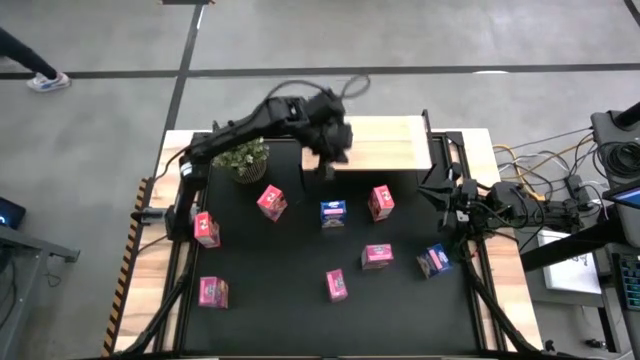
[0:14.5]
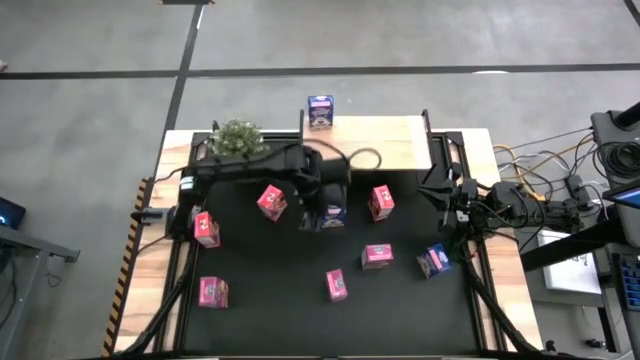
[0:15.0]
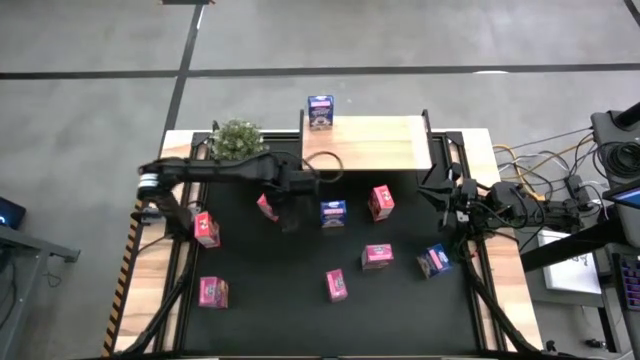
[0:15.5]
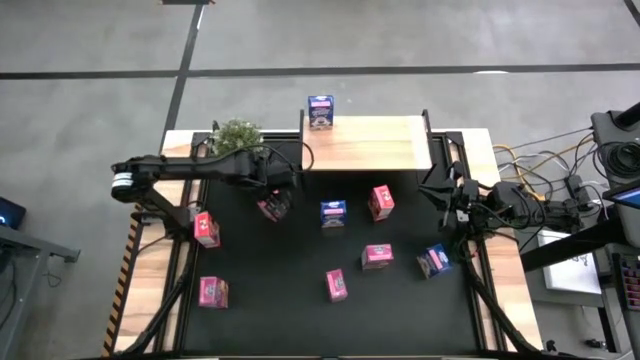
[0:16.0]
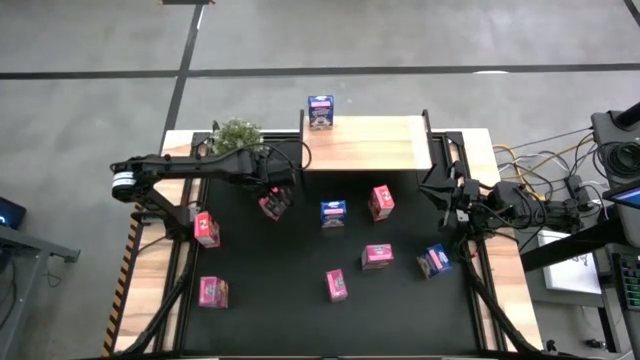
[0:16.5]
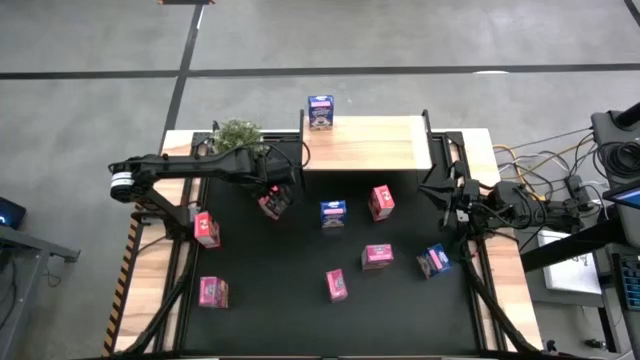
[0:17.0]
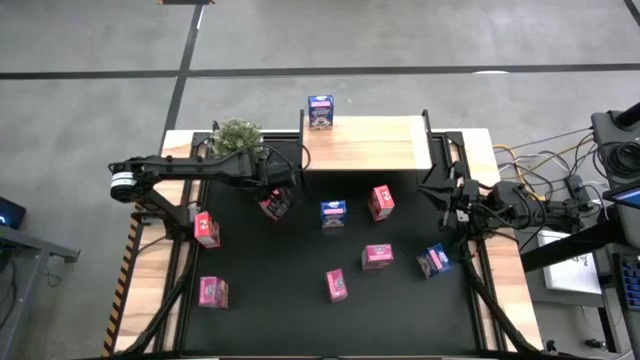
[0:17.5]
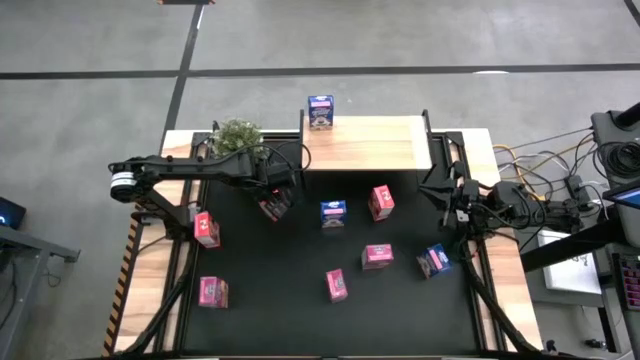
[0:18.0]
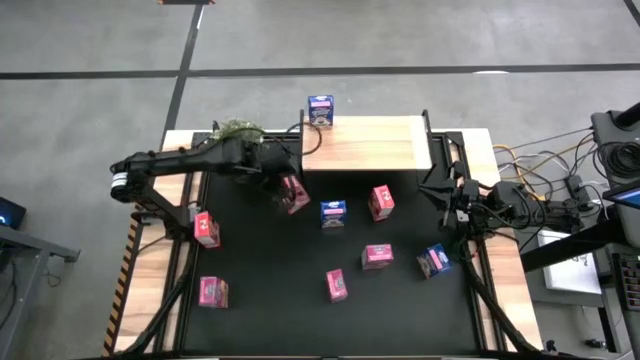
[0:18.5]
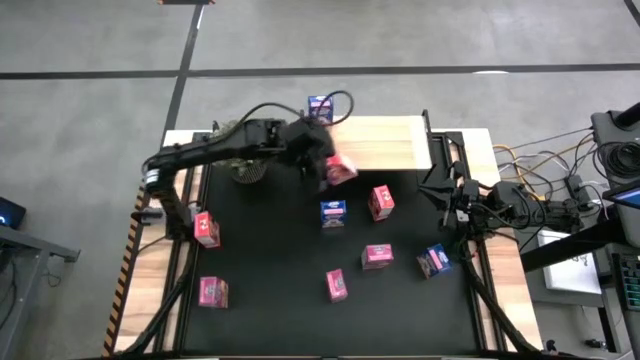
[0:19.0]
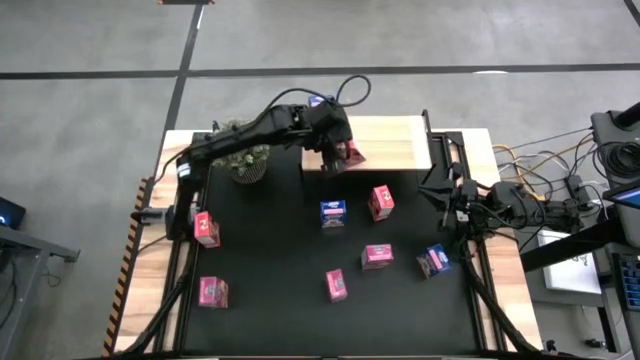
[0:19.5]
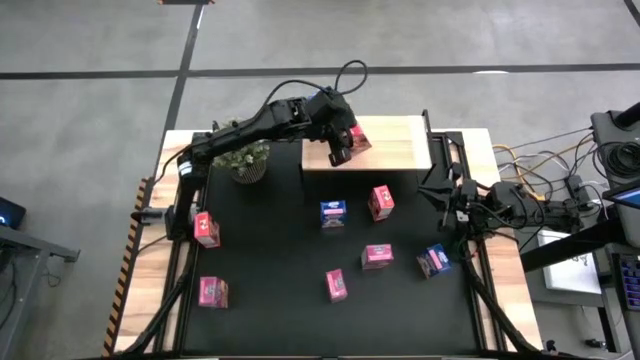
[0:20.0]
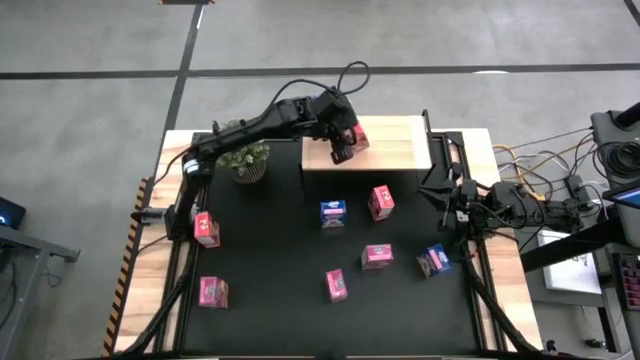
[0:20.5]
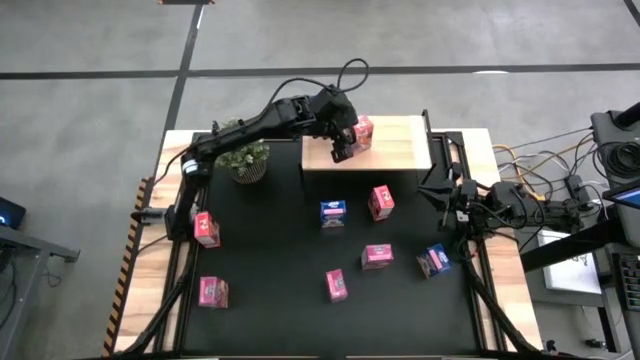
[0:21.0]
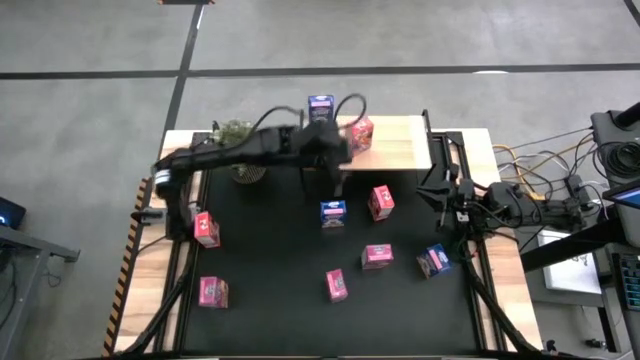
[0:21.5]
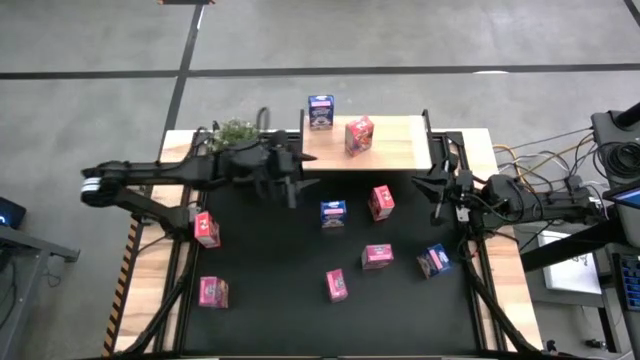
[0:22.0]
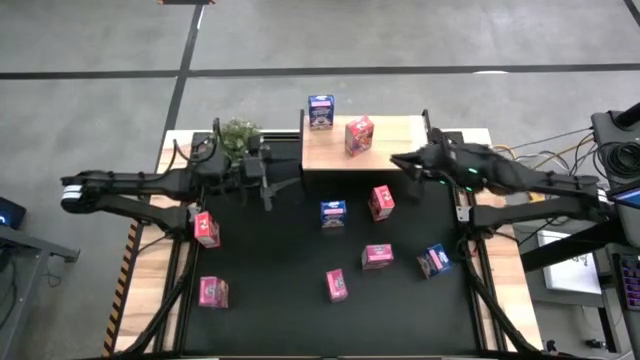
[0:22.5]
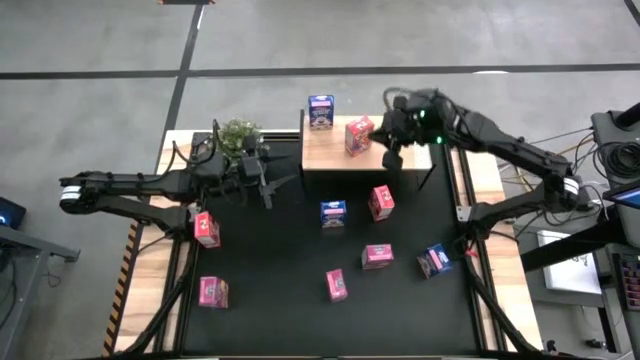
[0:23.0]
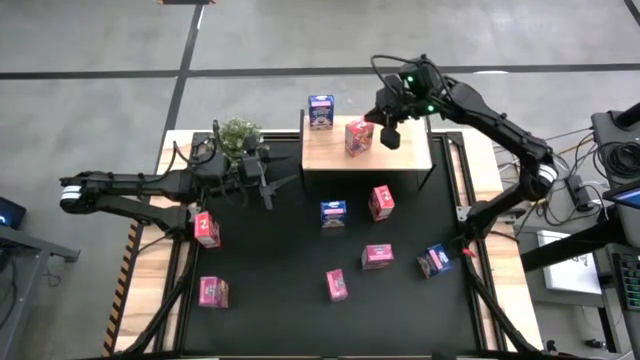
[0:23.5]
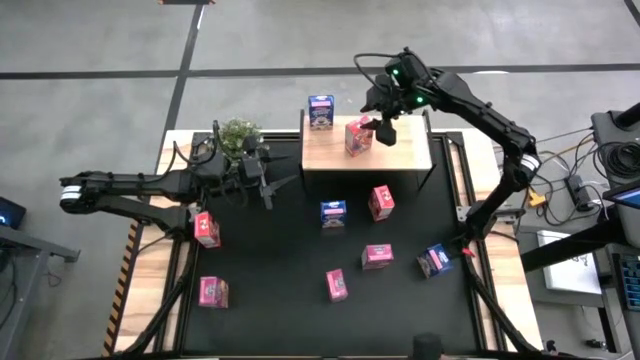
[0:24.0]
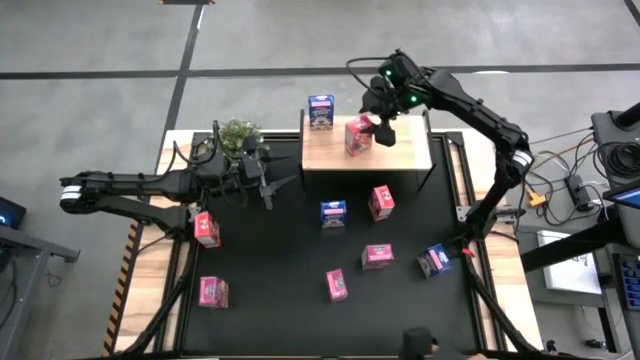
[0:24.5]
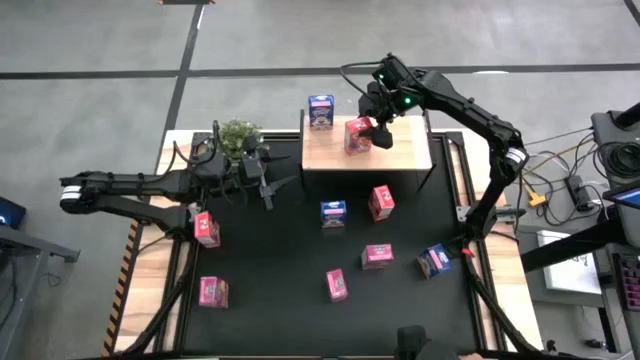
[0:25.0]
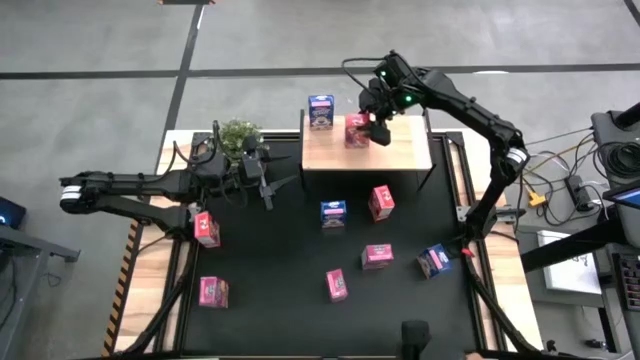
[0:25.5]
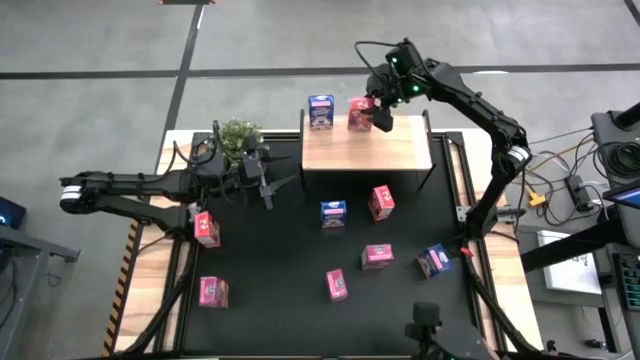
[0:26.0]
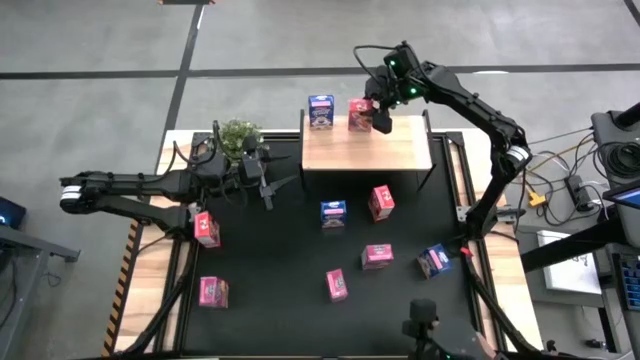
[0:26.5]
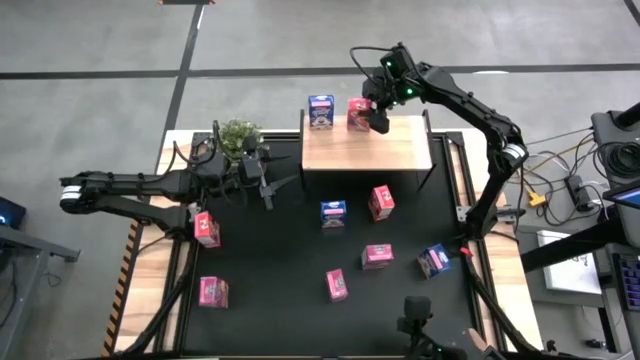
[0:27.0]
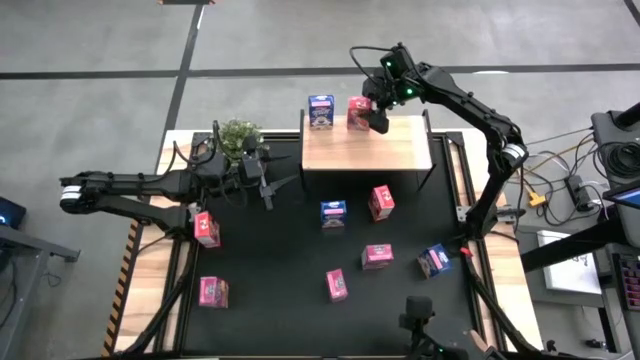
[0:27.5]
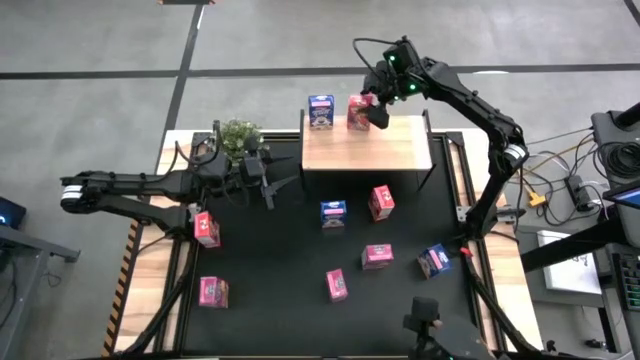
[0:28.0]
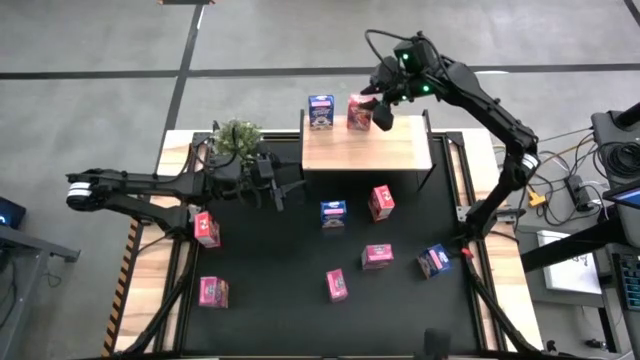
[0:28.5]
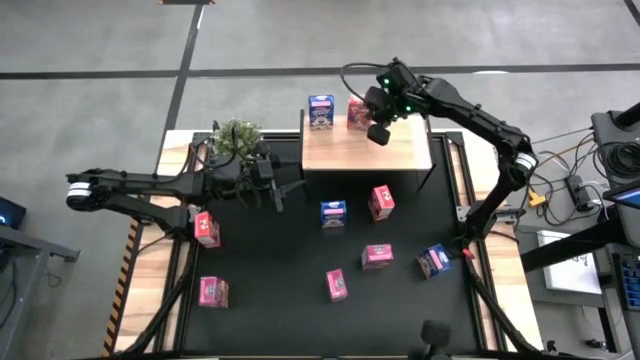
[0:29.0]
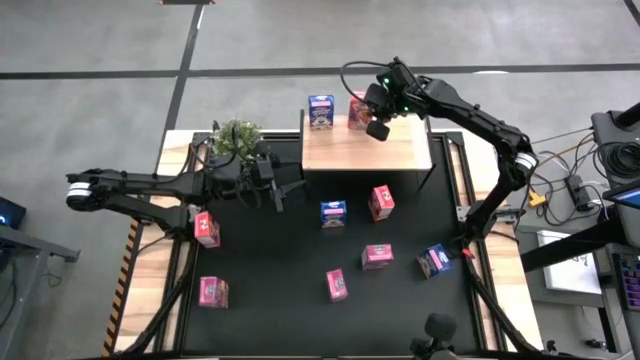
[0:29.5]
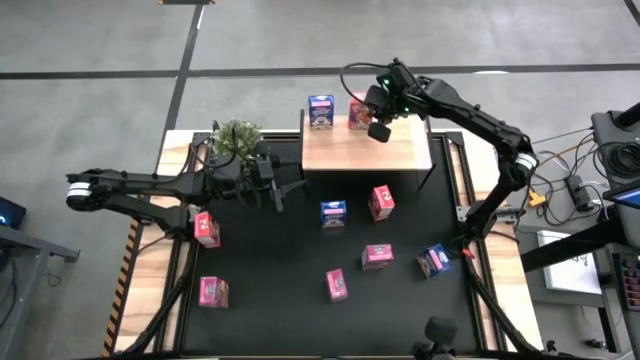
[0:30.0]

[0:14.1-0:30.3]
Task: Stack cereal on shelf
Put the middle red cereal box on the shelf

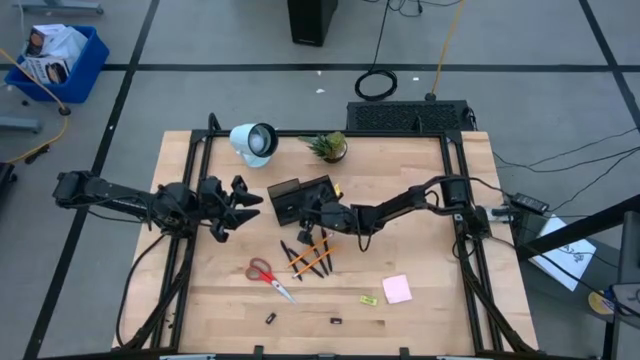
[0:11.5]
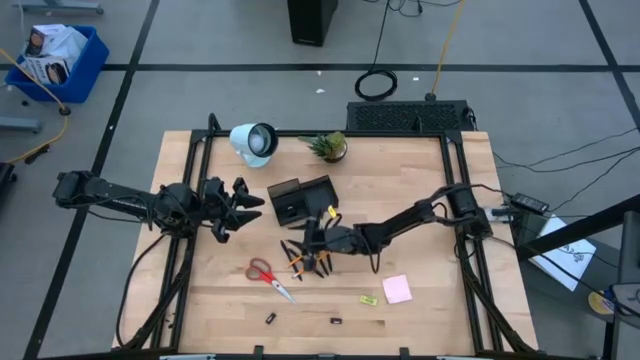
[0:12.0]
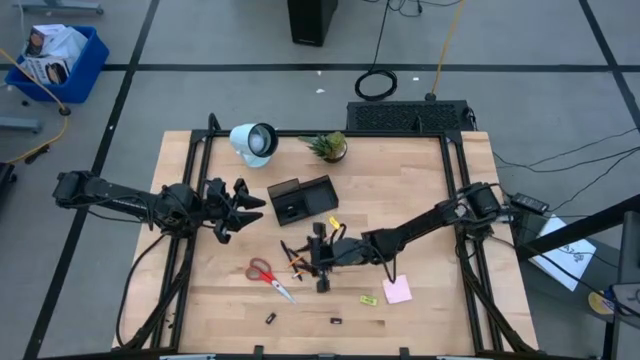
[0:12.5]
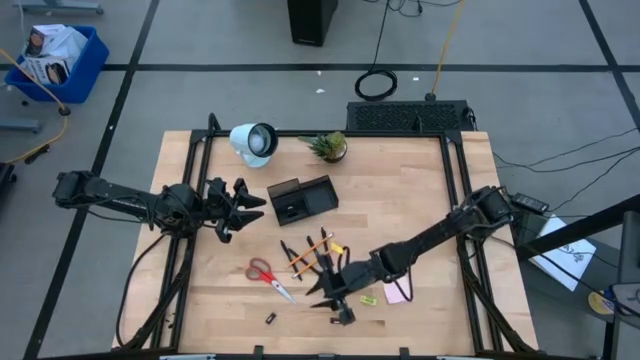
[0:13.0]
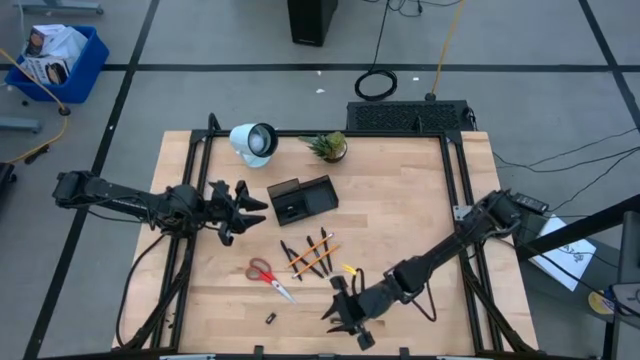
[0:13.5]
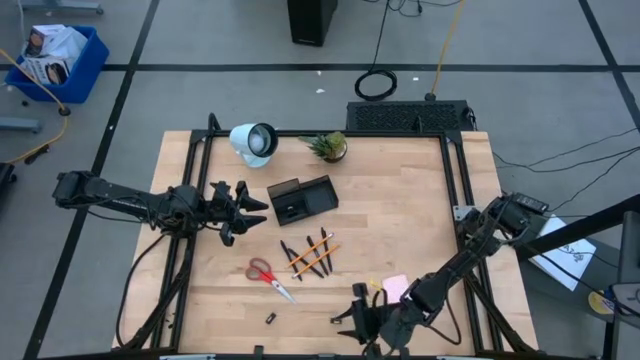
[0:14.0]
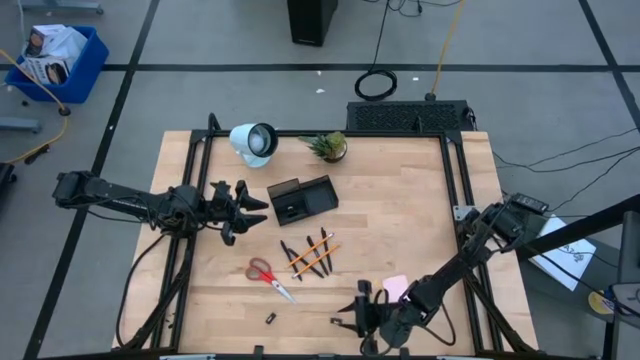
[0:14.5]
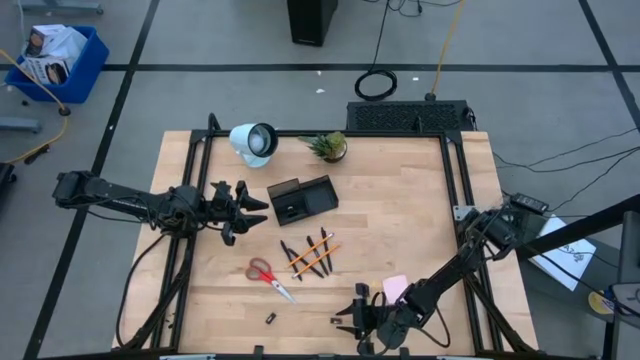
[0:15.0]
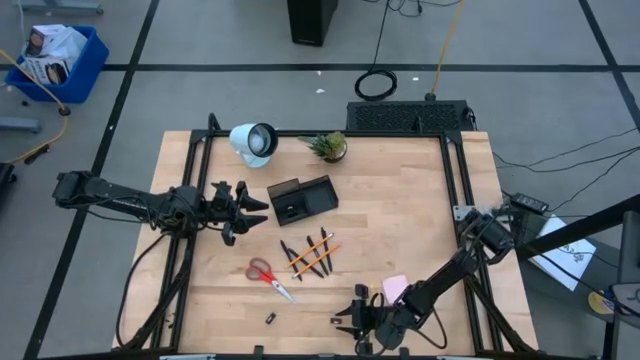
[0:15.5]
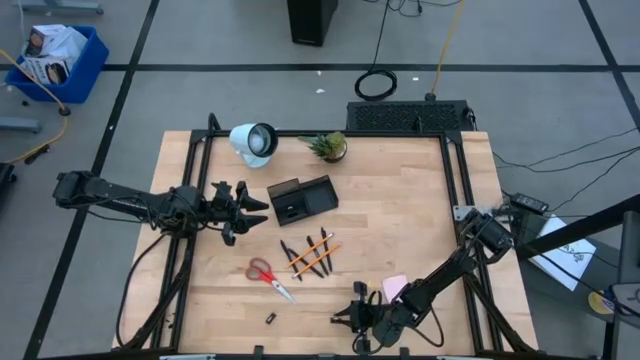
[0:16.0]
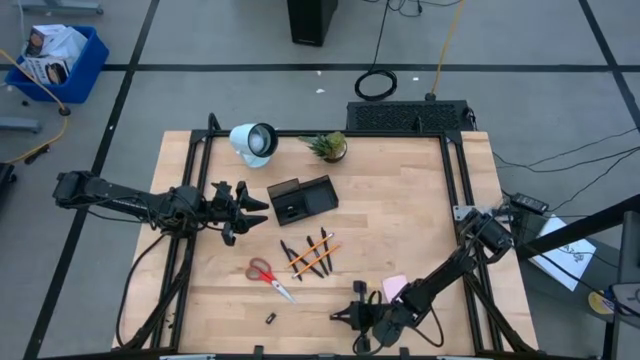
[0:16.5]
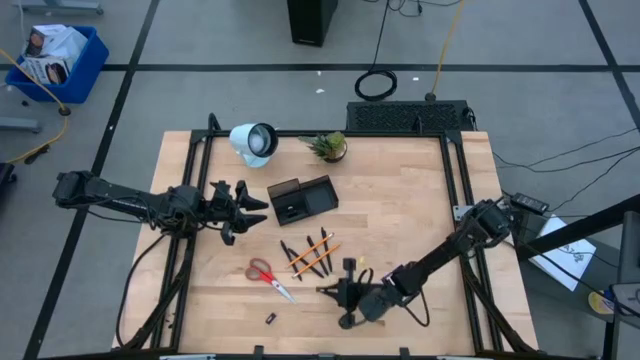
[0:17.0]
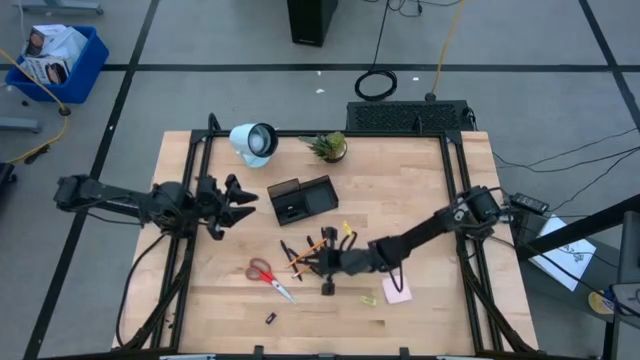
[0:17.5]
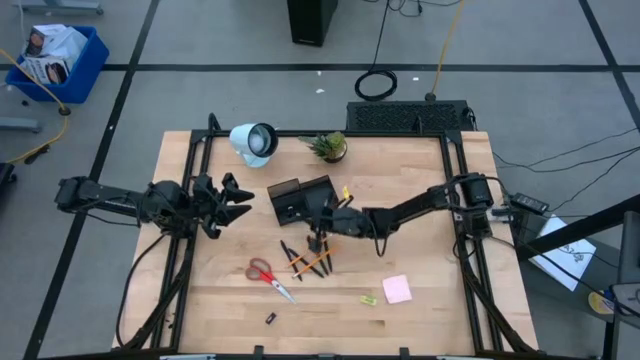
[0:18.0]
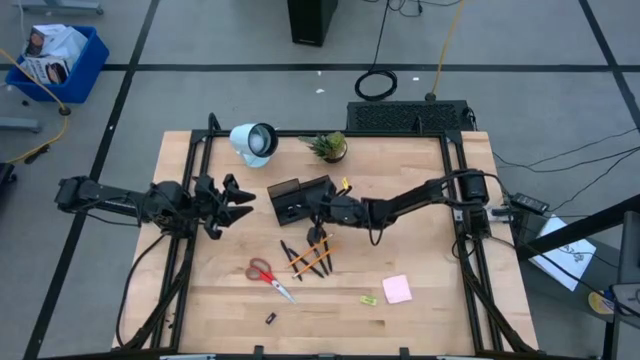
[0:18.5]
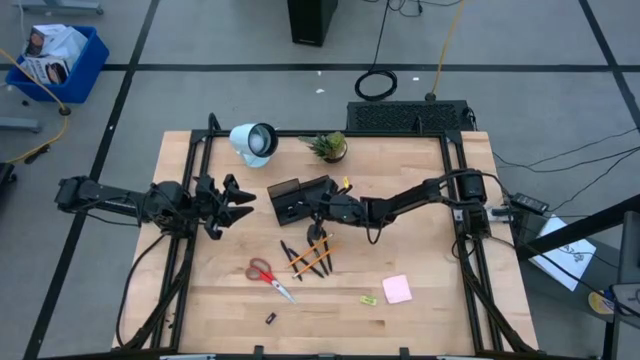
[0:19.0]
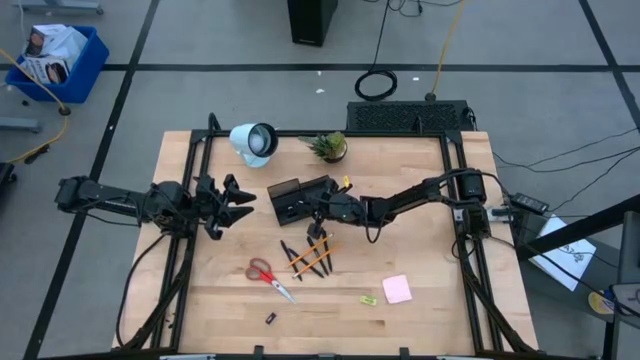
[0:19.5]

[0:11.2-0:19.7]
Task: Pick and place office supplies into organizer
Put the black binder clip into the black desk organizer
